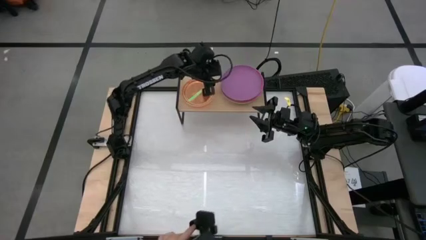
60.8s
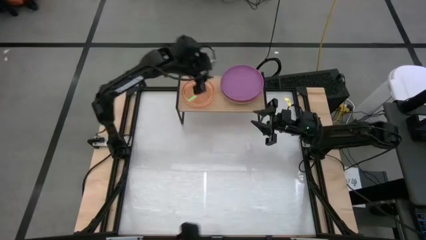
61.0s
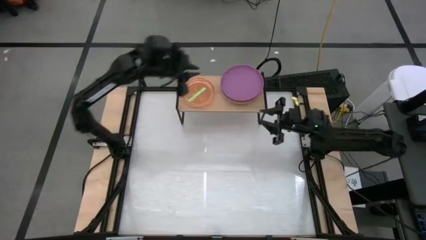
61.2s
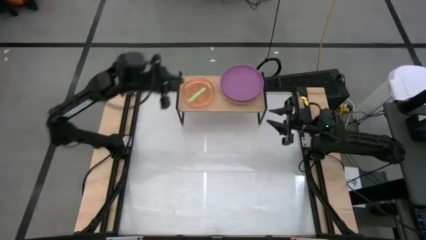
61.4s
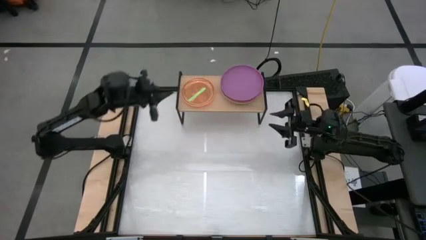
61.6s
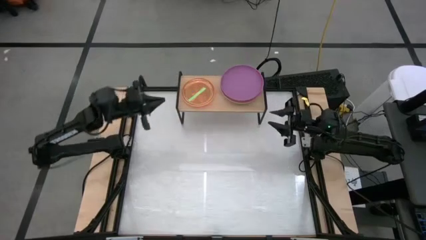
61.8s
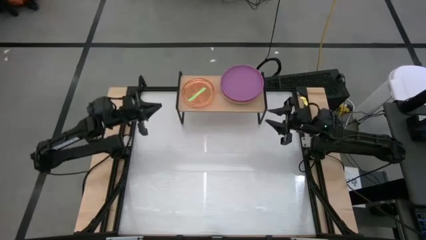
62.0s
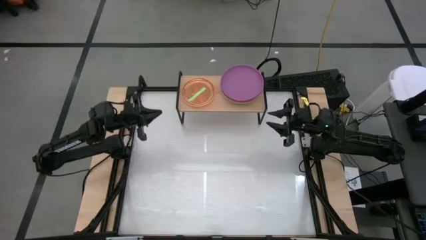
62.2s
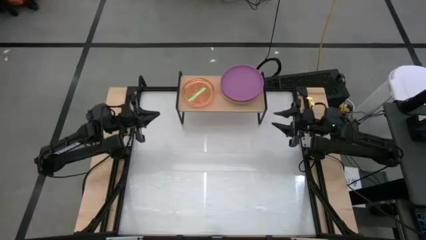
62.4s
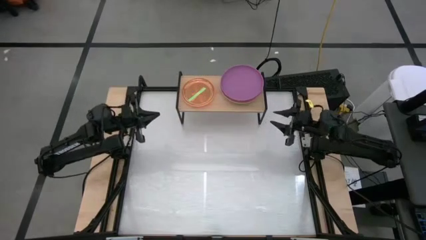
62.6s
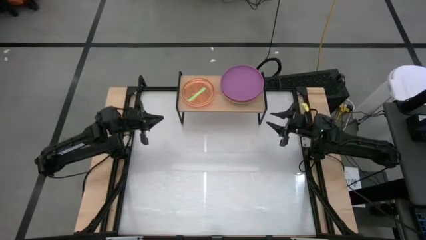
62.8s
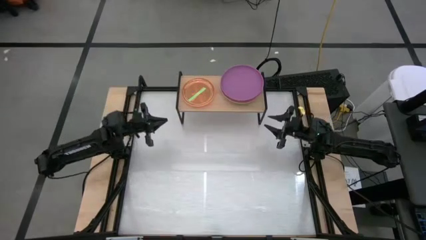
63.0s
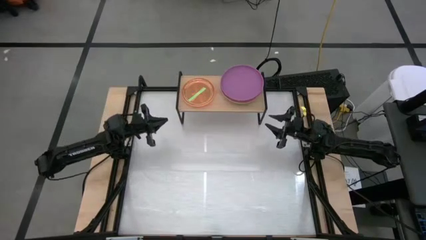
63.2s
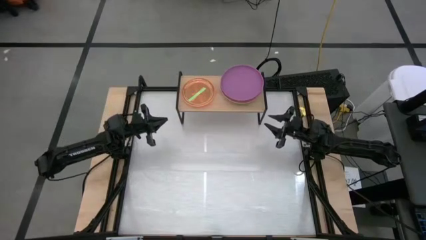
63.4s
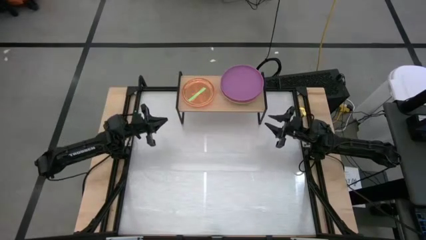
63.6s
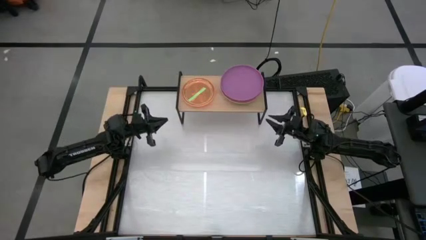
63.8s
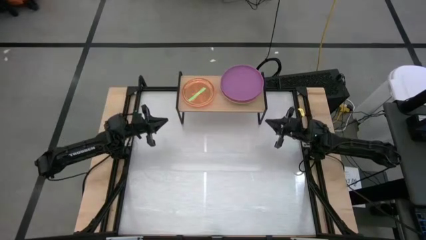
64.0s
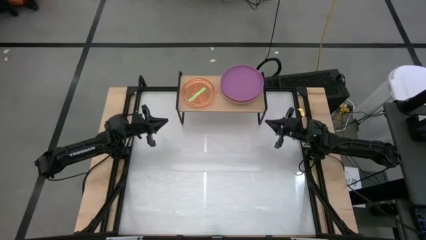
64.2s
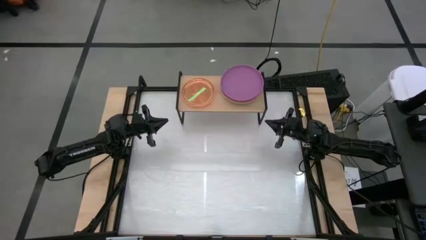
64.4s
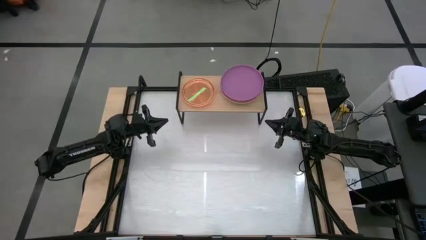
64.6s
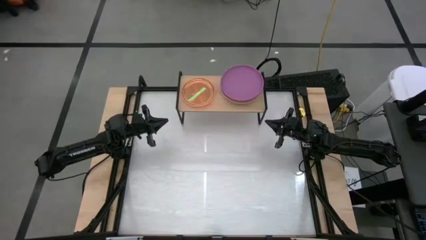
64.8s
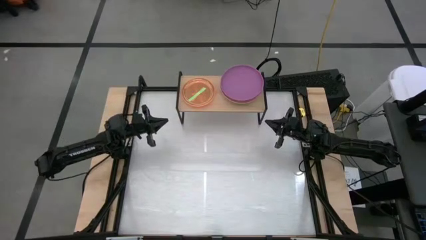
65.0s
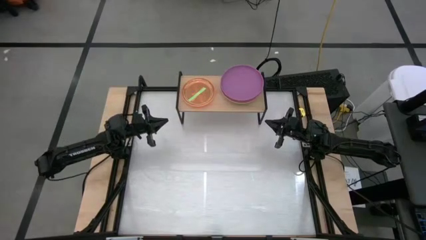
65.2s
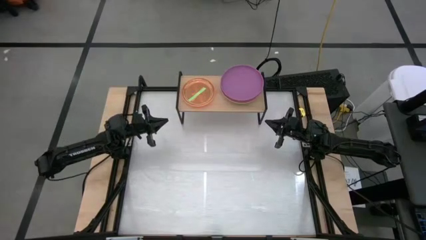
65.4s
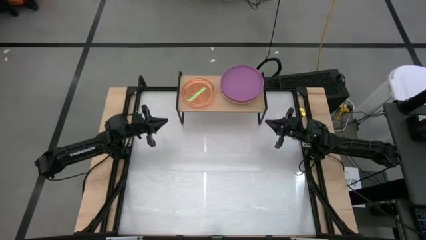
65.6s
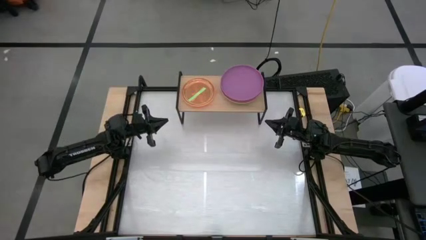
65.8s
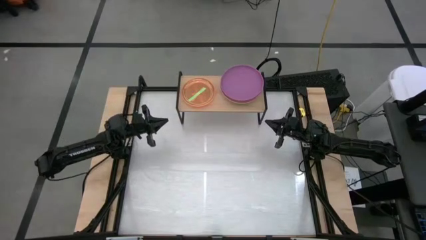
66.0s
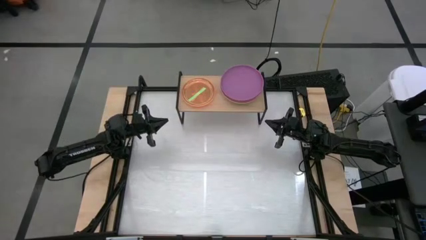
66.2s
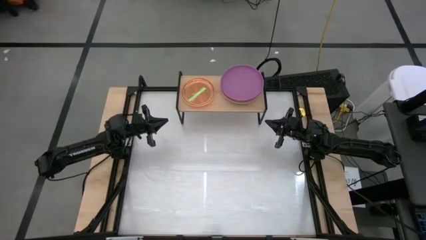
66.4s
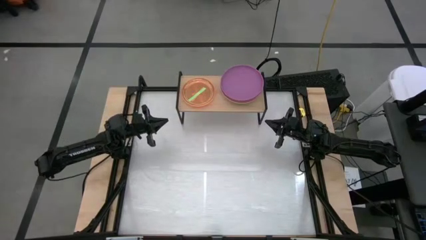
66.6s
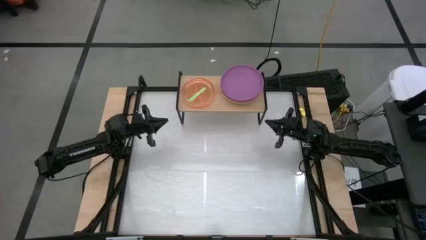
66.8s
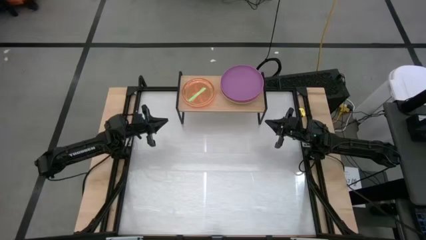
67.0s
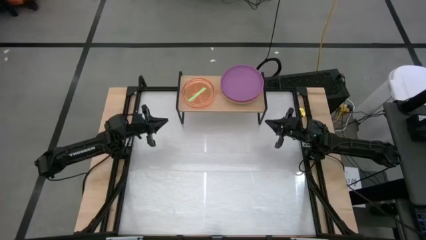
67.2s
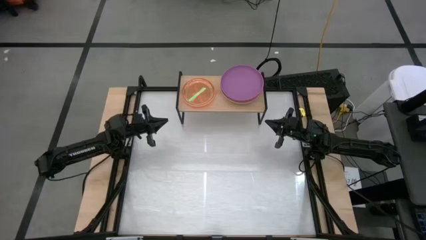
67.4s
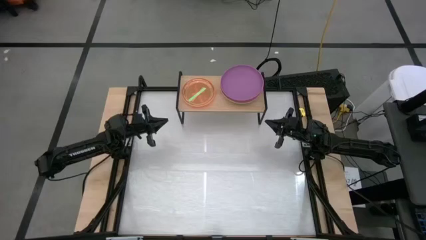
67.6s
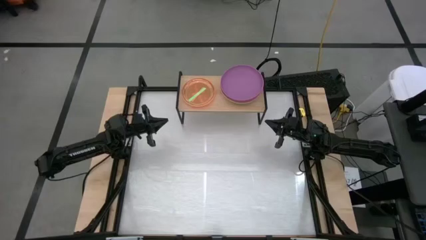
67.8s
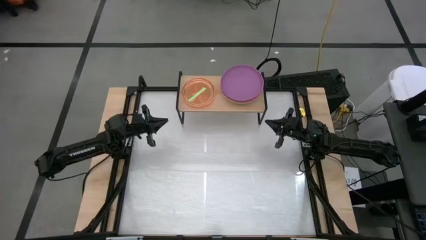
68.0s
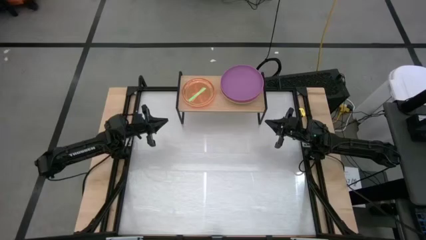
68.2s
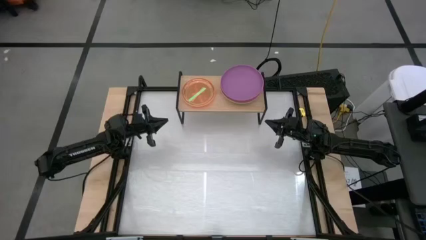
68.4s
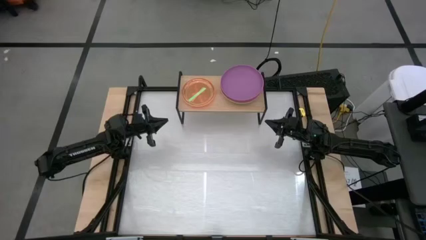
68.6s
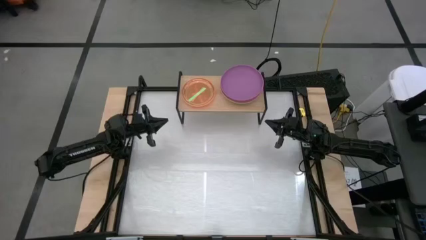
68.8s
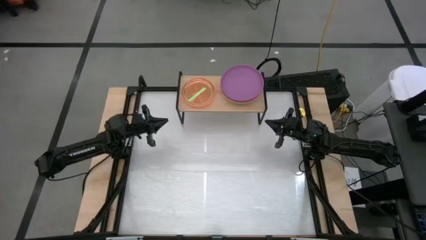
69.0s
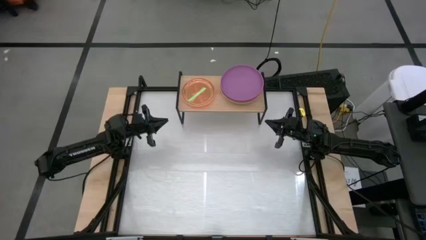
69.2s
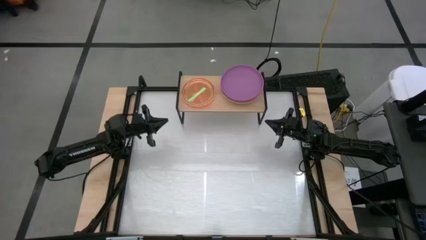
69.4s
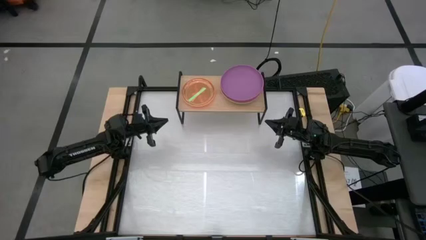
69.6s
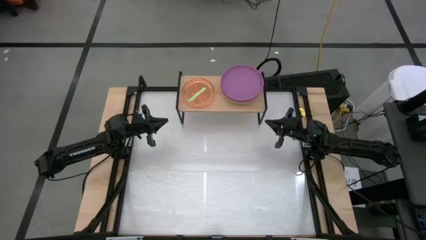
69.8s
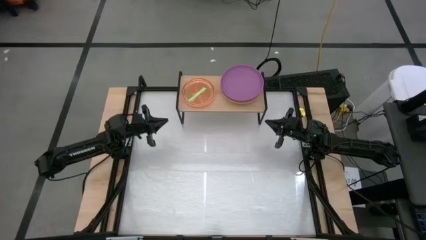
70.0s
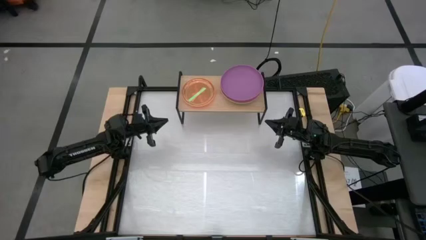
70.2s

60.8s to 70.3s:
Task: Place and stack plates onto a shelf
Return to Home Position

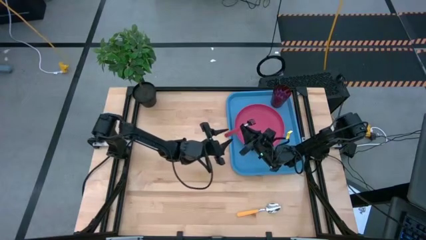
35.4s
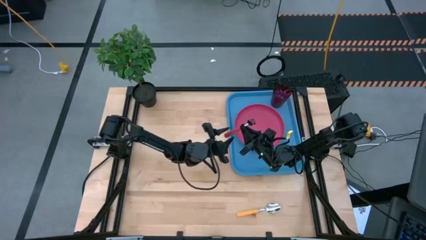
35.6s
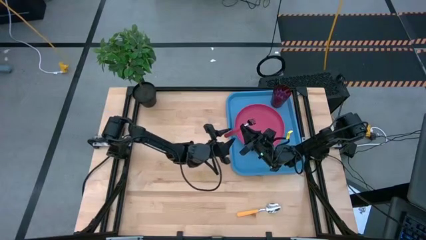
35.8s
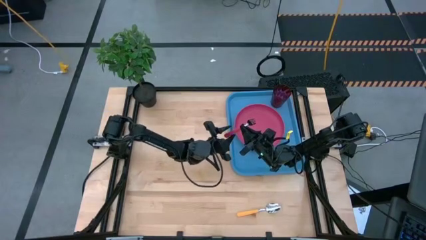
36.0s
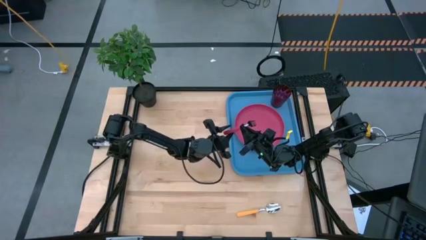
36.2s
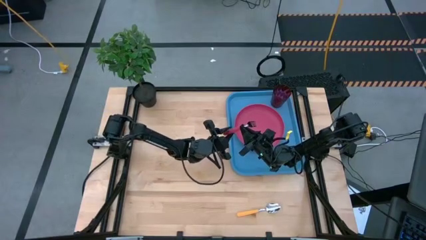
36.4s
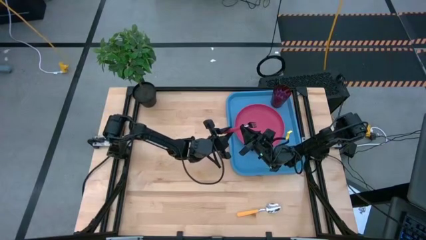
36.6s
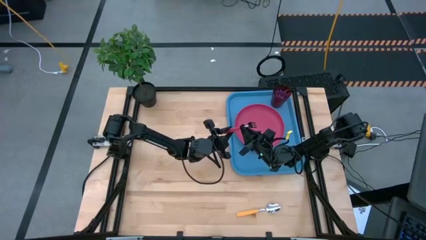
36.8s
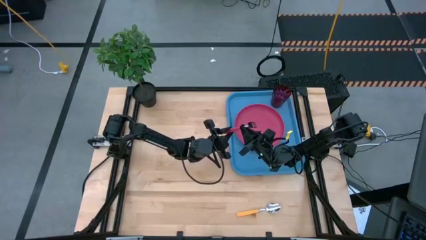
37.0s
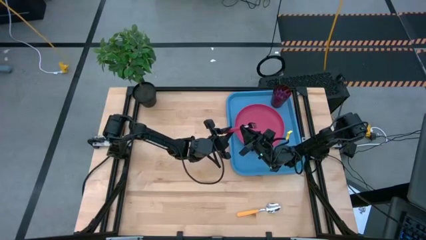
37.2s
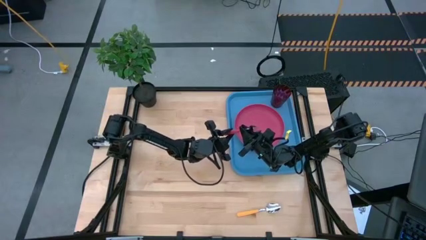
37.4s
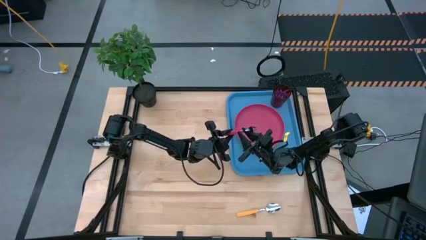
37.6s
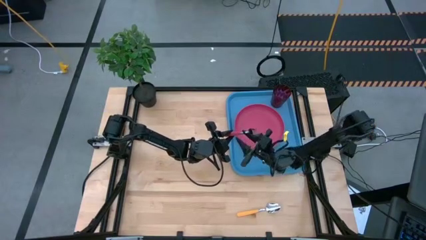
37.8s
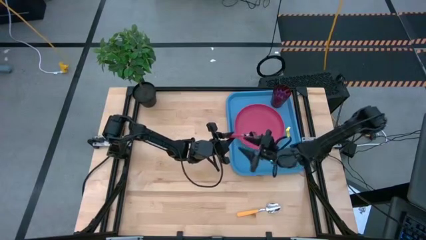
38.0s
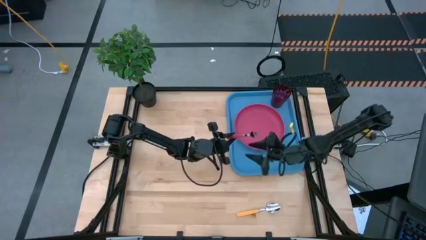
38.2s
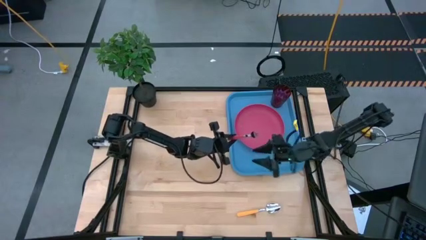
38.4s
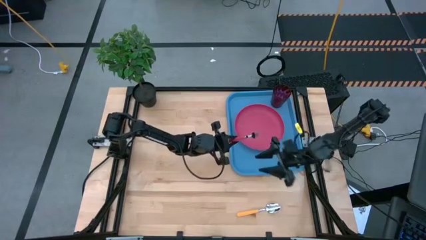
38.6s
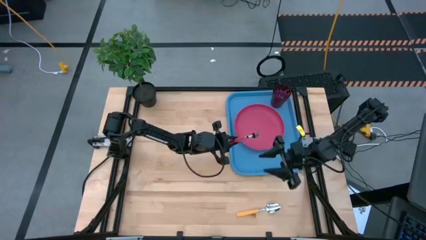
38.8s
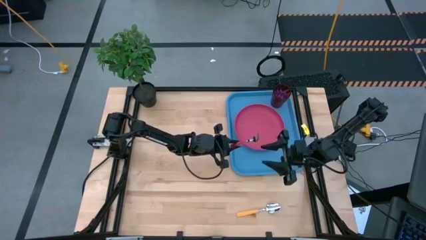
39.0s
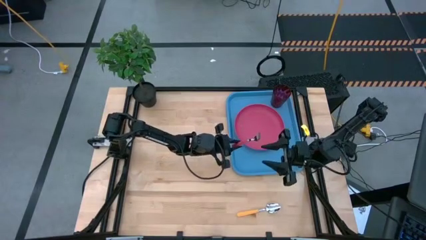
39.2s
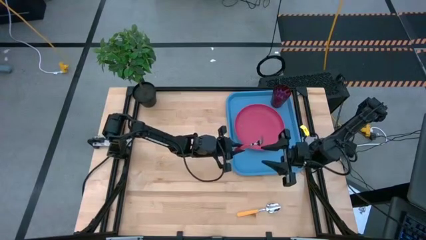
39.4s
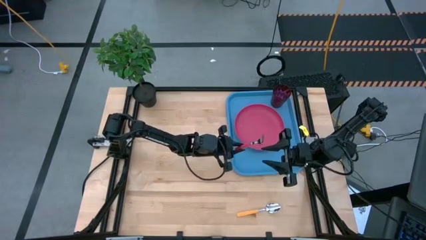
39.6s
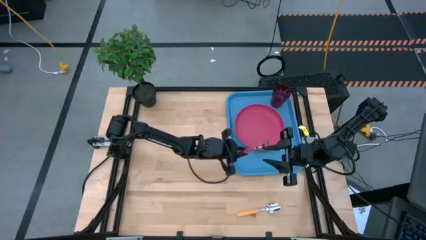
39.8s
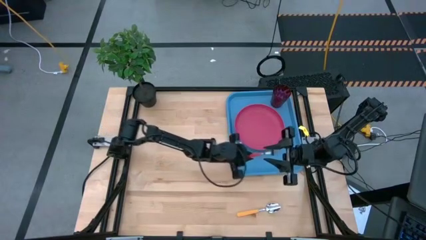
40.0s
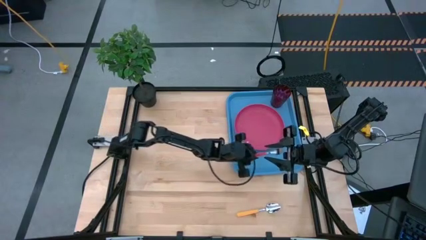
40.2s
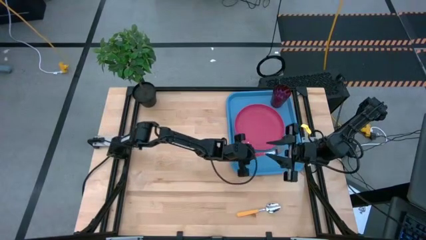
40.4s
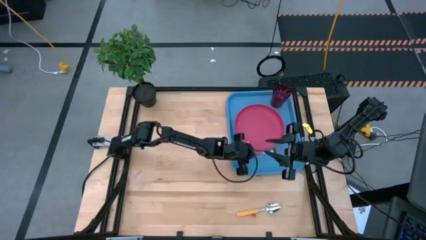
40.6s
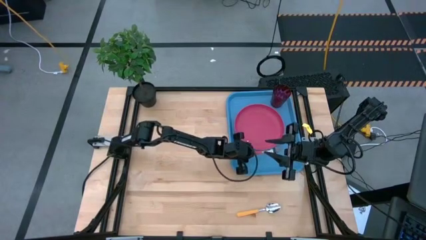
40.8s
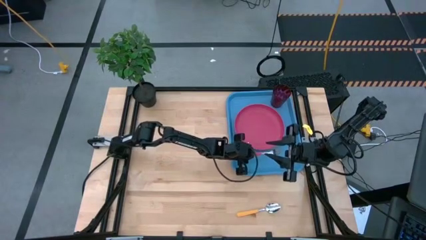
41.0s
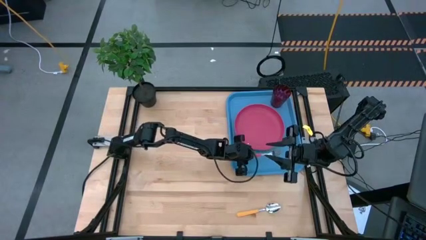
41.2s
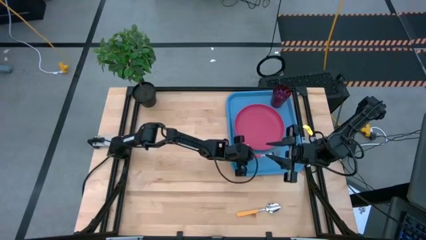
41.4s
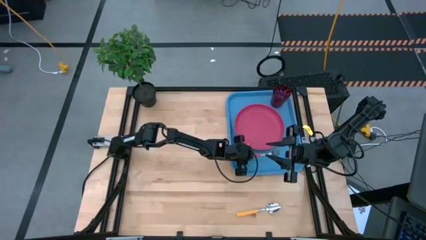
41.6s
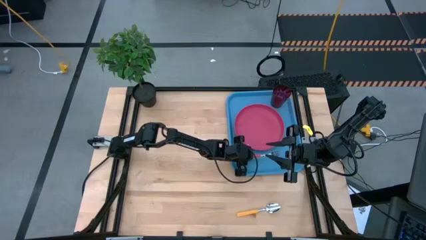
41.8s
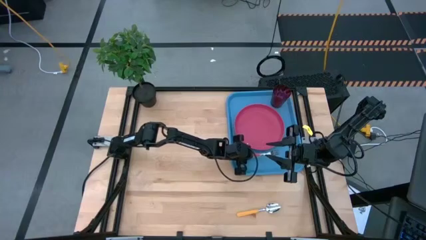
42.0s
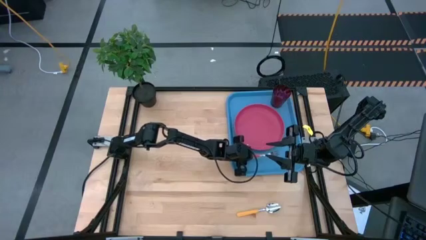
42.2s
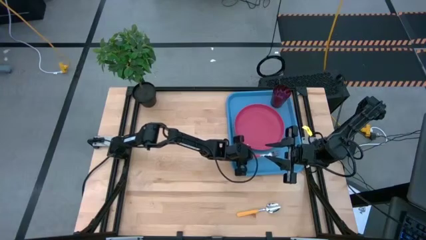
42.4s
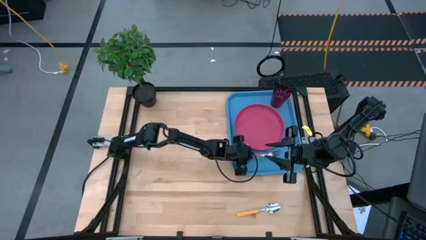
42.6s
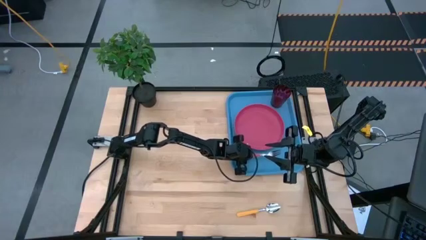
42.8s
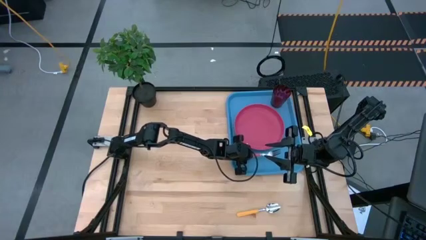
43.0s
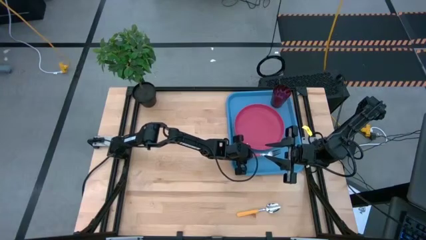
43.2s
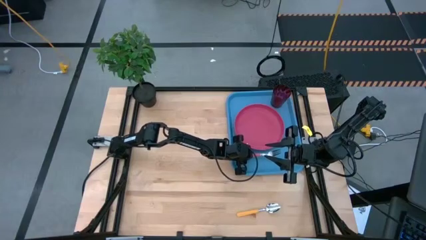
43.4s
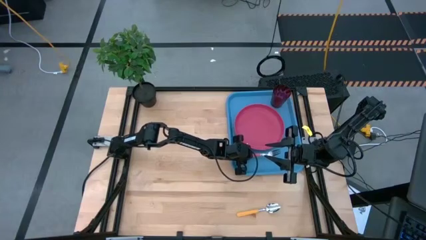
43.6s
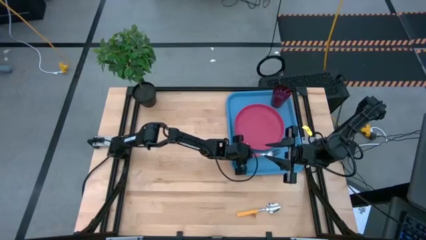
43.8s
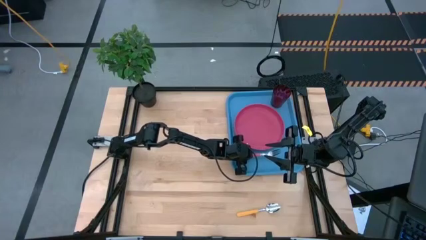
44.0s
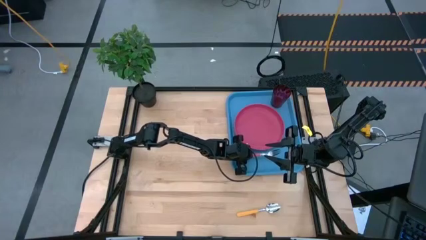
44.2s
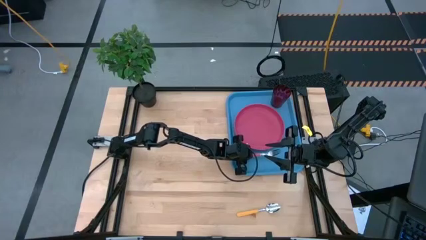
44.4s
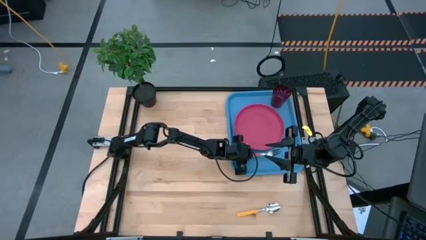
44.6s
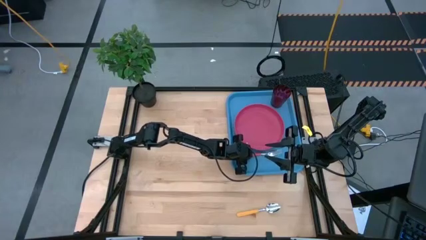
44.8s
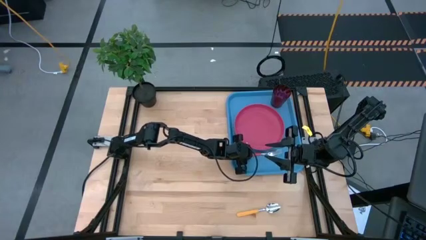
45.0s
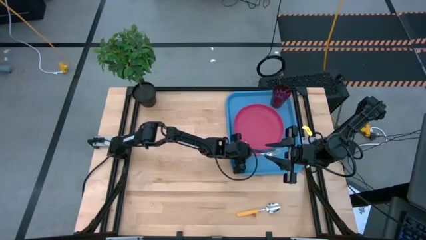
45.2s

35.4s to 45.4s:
Task: Pick and place plate/cup/fork/spoon on tray
Put the pink fork on the blue tray
